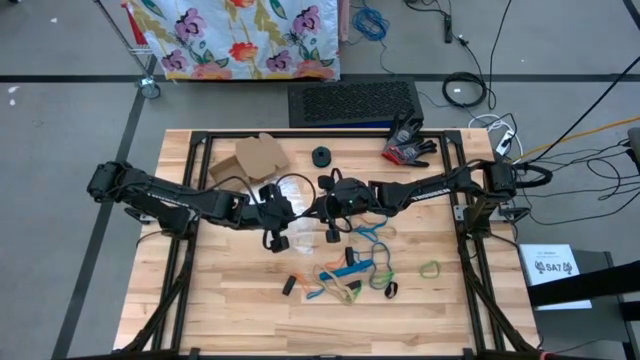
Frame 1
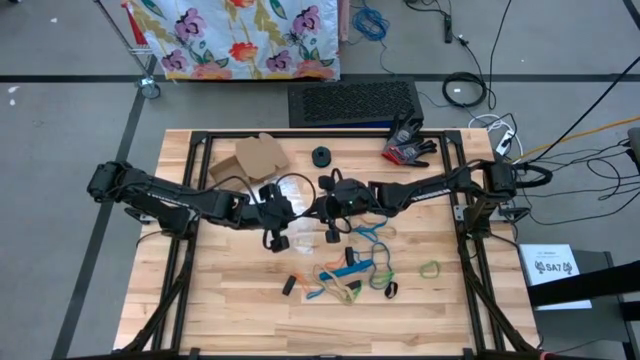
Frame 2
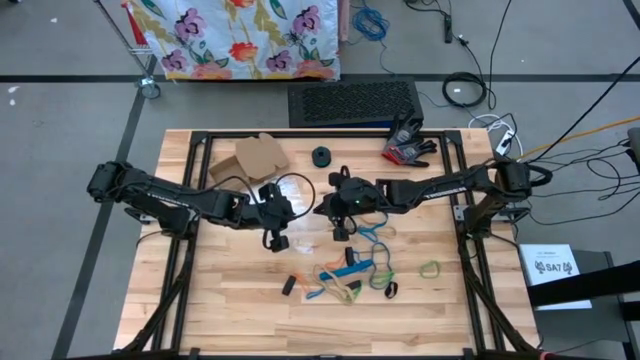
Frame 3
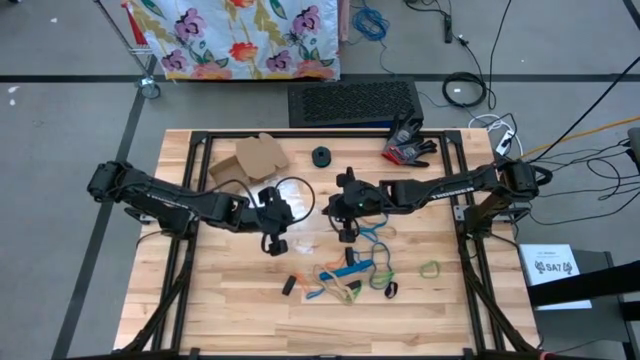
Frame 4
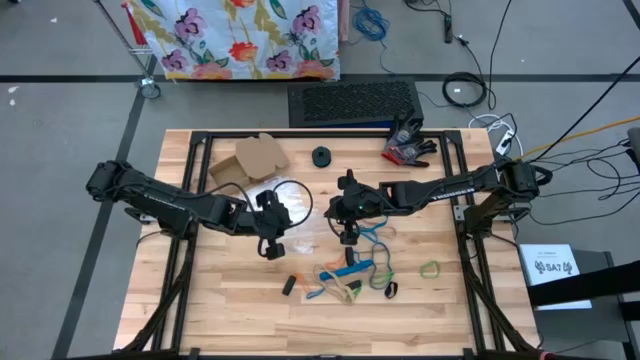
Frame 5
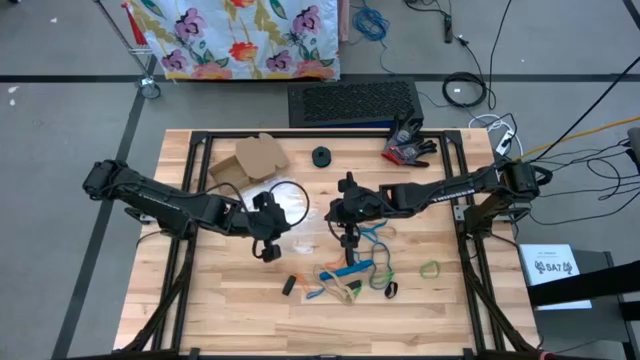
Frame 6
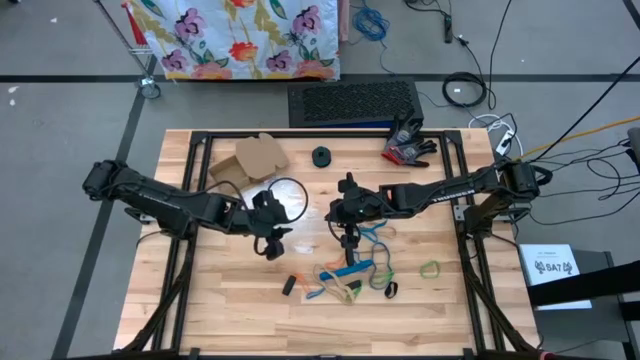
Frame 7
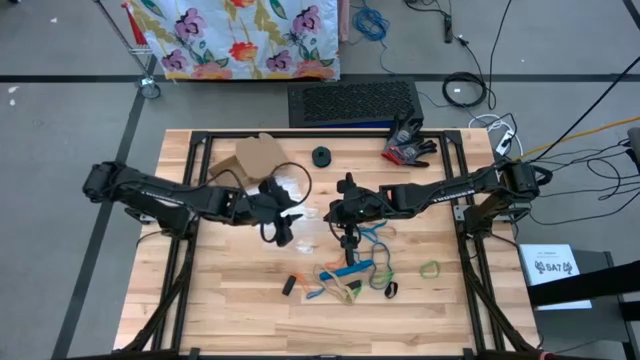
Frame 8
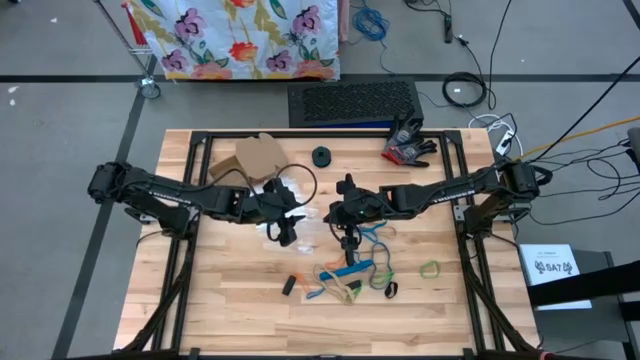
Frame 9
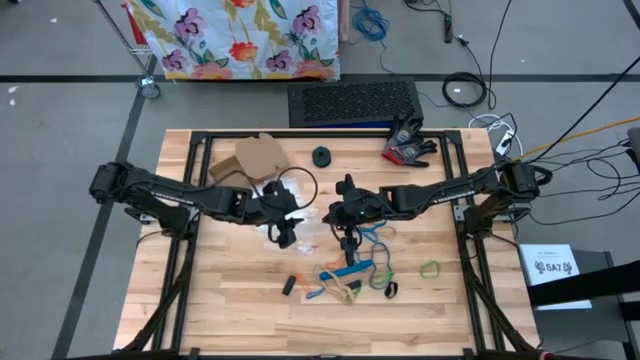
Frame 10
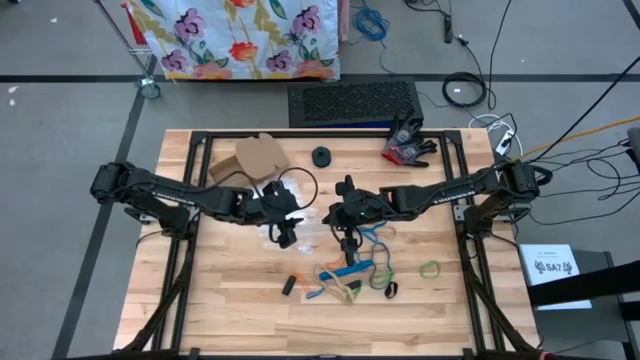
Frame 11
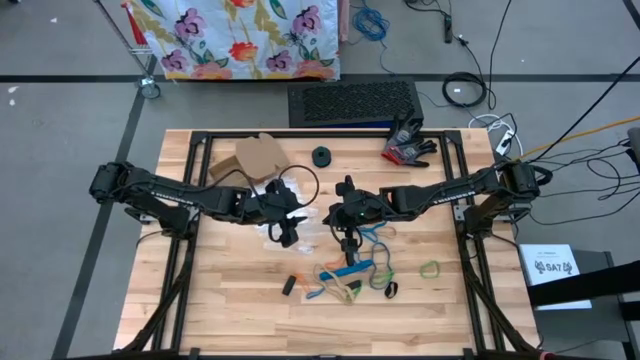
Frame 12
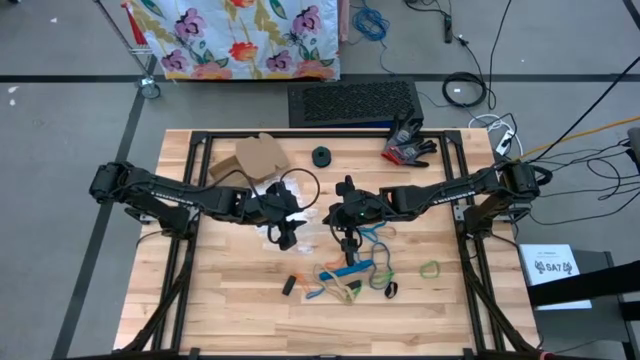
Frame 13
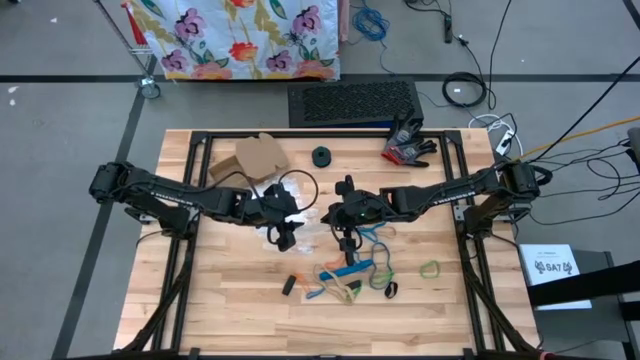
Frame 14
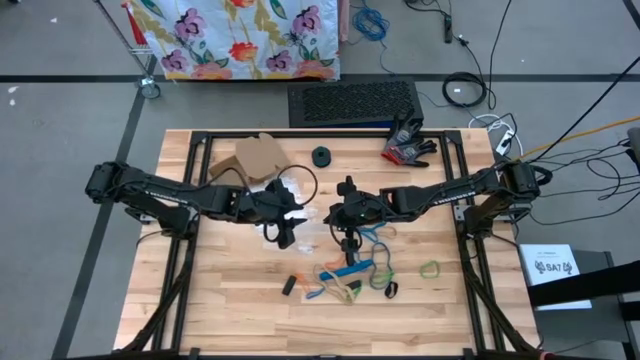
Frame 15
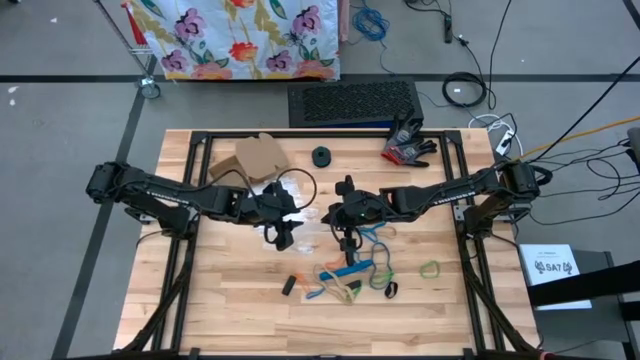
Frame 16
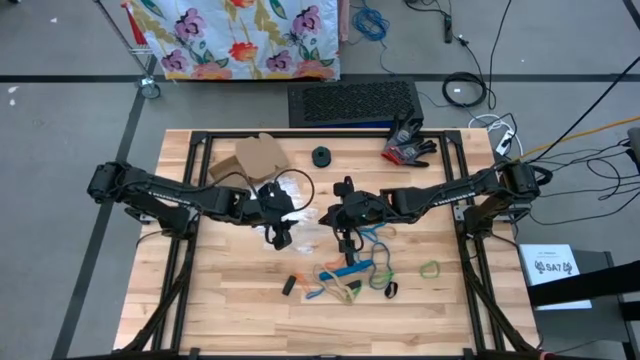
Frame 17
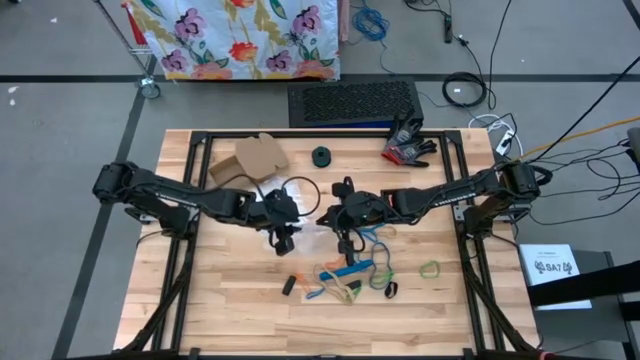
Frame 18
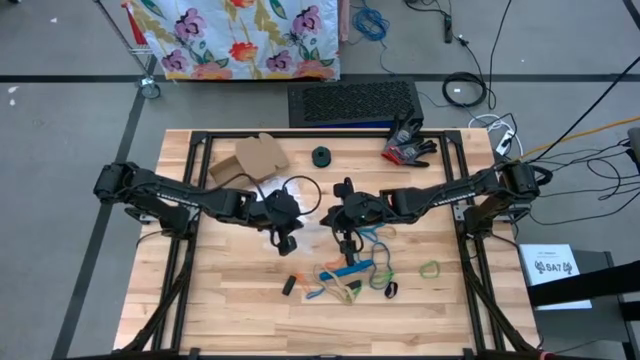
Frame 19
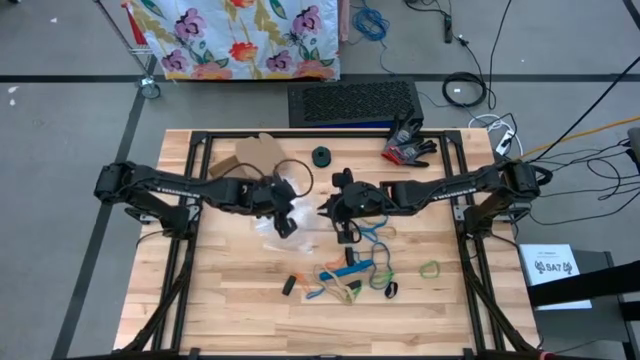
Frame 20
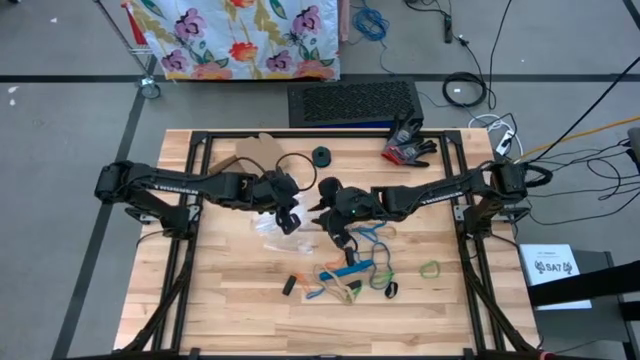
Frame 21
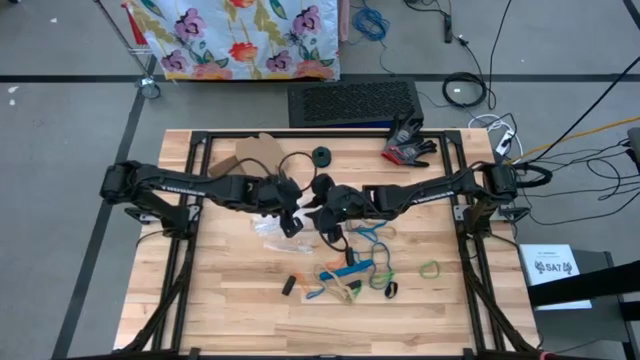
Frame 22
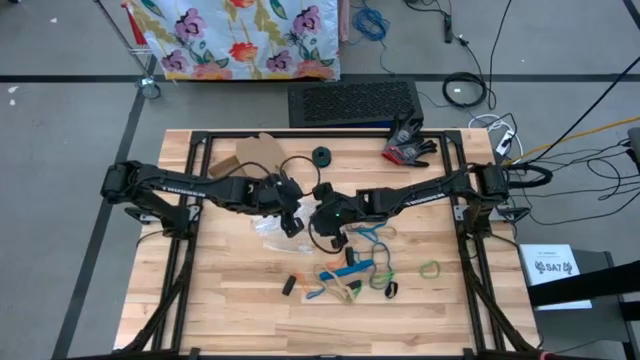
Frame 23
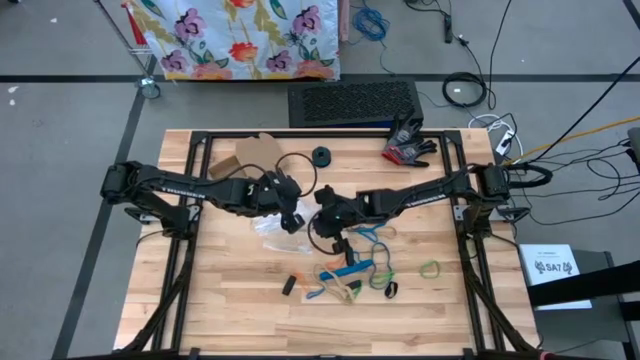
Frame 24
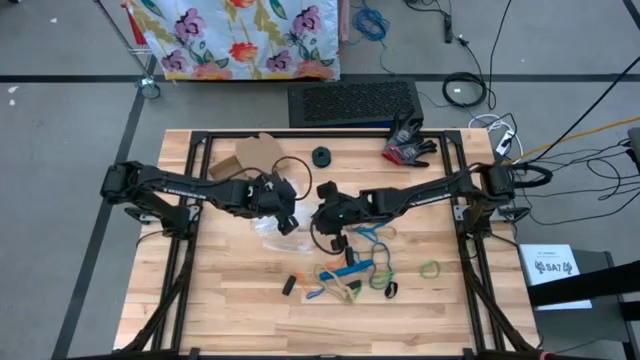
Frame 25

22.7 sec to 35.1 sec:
Task: Sort rubber bands
Open the transparent zip bag

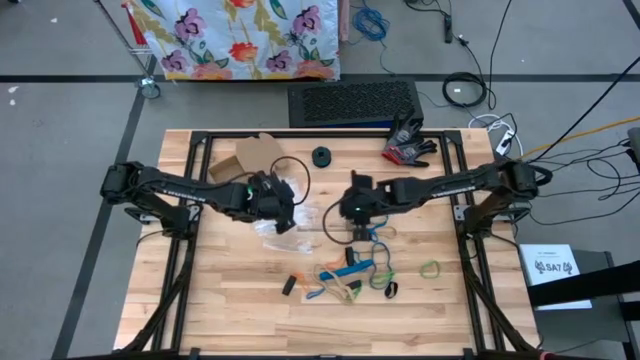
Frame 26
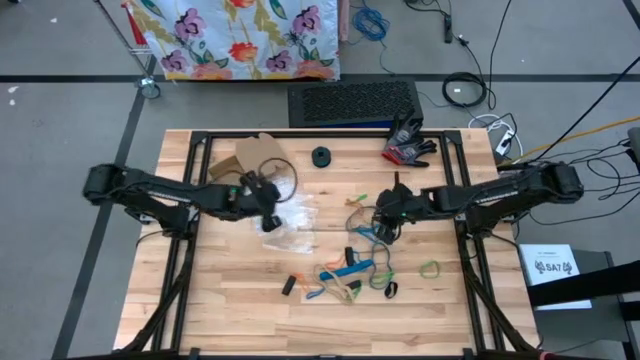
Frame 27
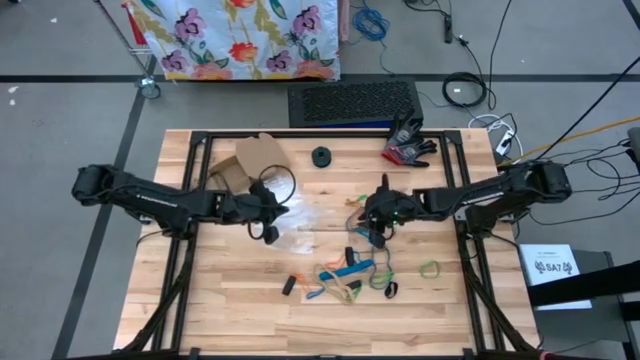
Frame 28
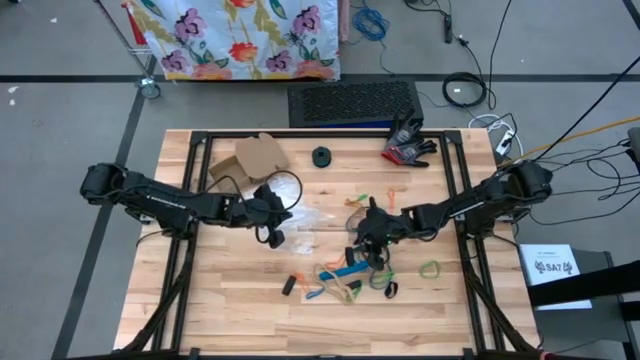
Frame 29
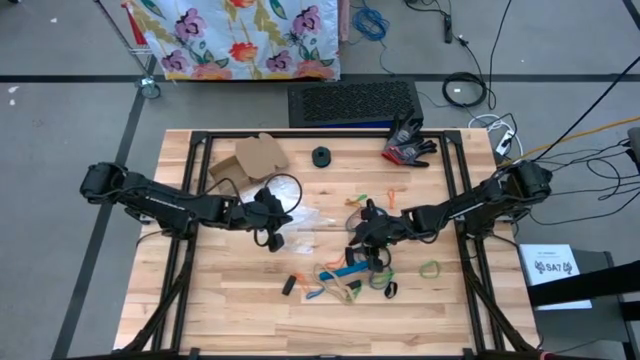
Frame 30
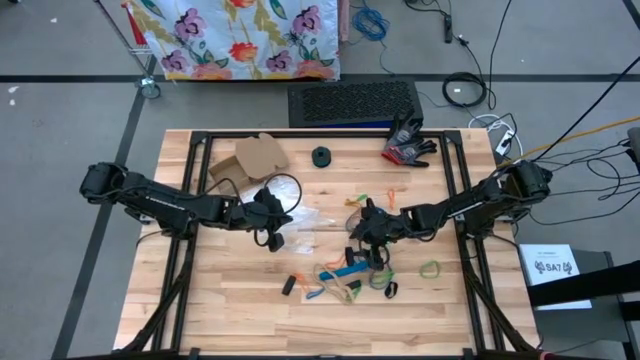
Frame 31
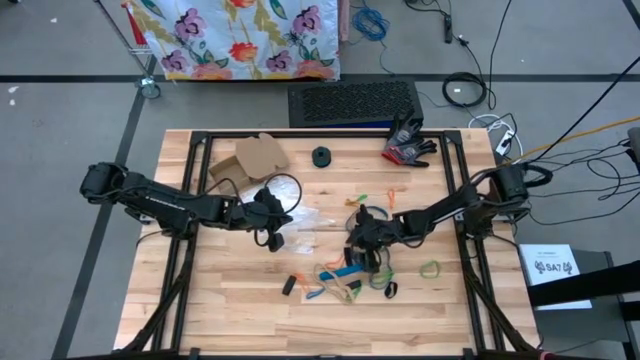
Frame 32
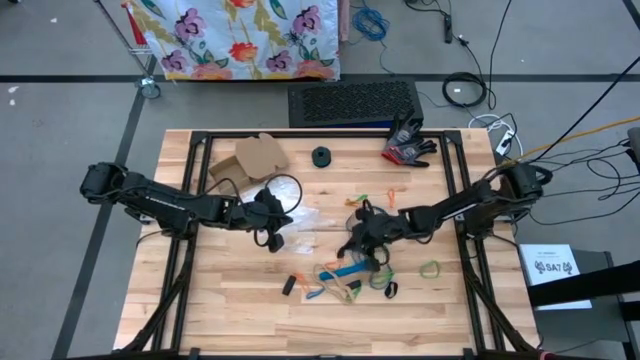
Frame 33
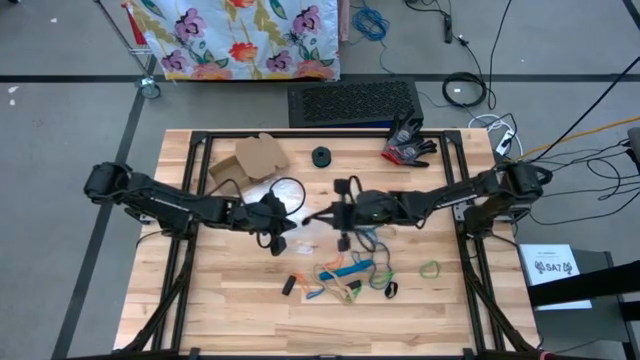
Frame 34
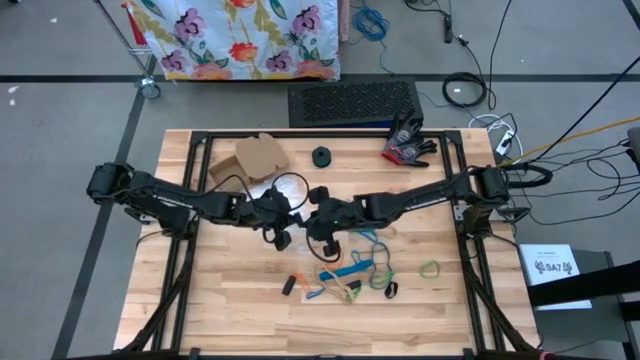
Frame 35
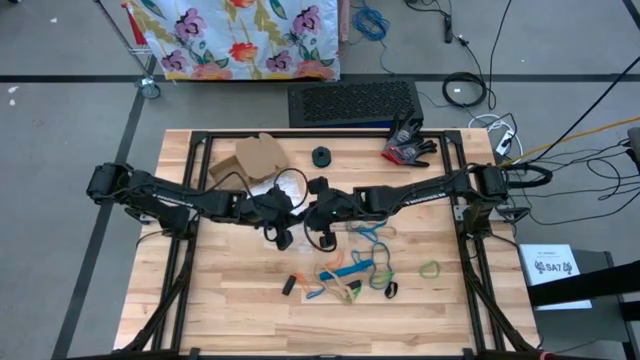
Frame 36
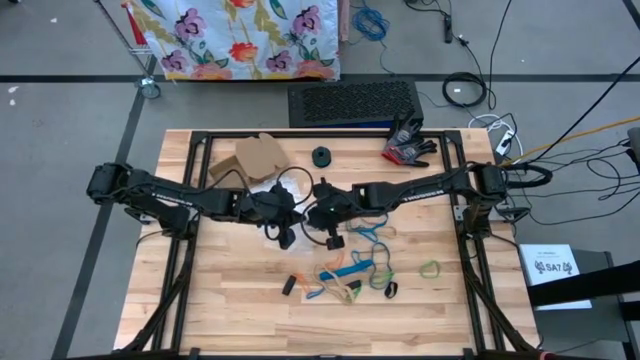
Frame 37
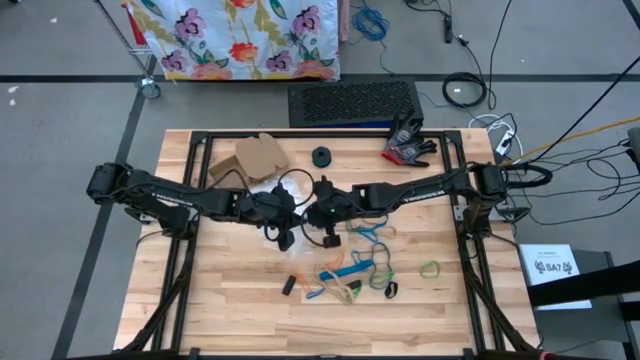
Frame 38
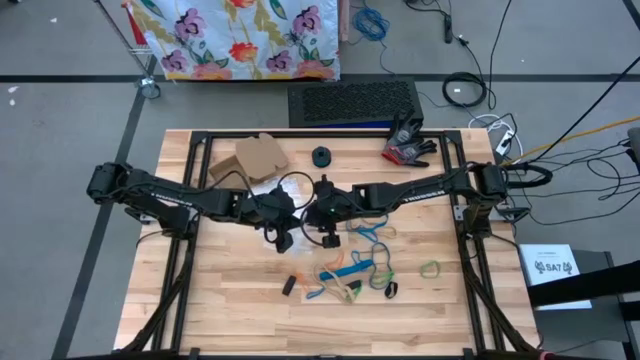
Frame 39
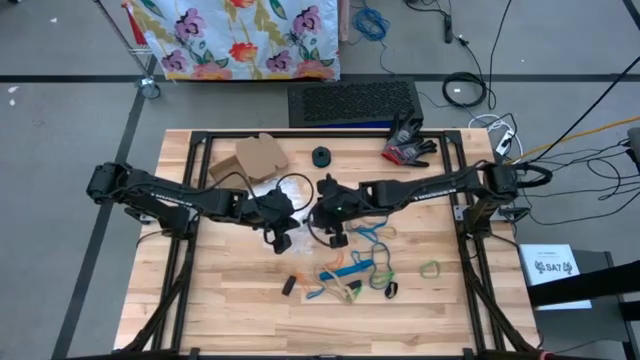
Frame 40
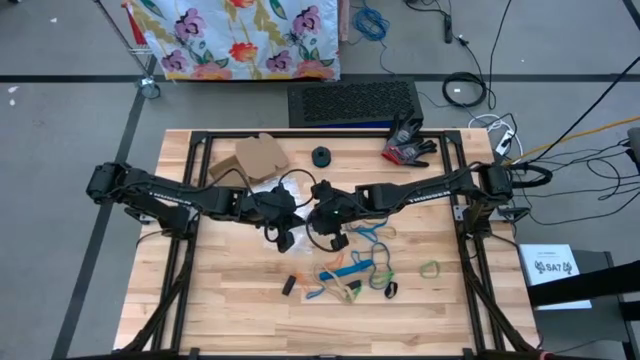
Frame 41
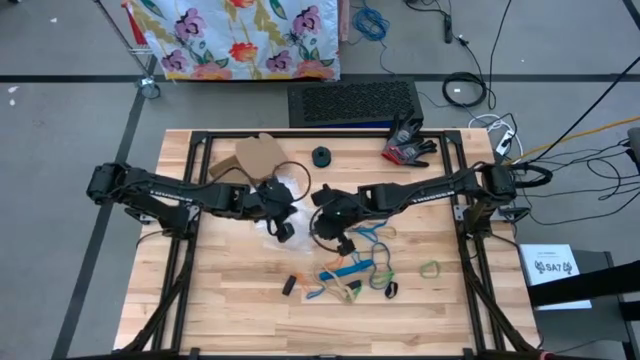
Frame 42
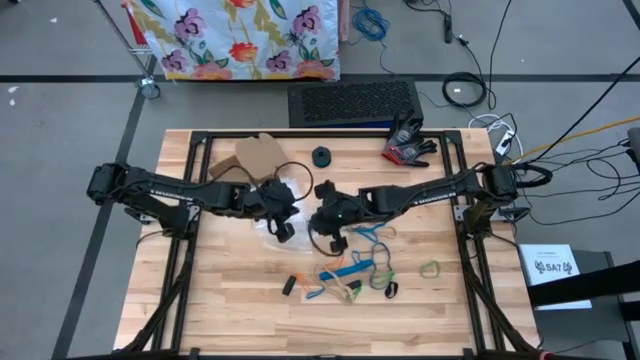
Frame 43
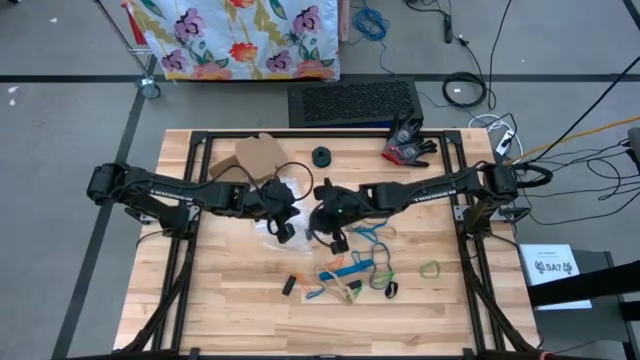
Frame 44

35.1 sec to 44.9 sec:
Put the black rubber band into the transparent zip bag
